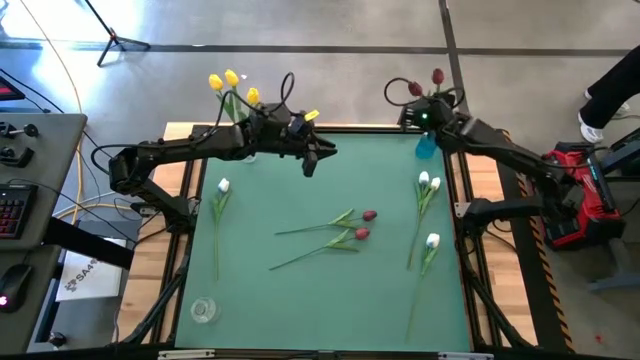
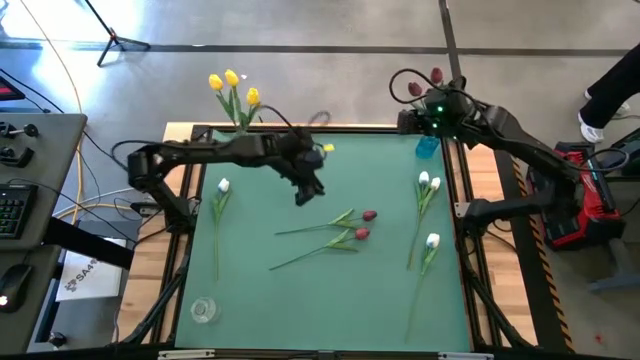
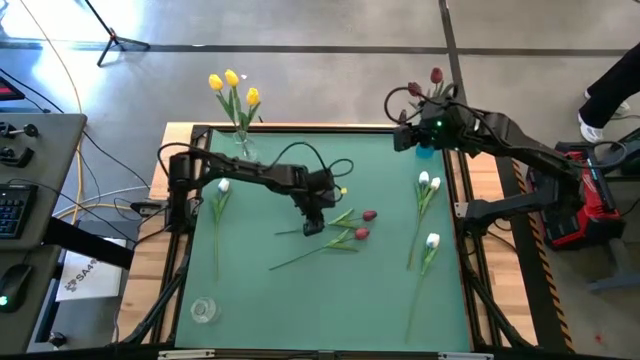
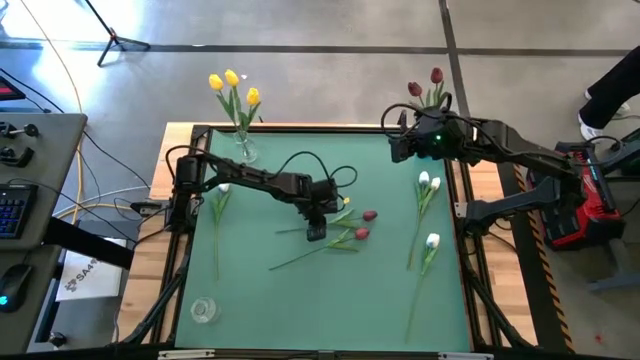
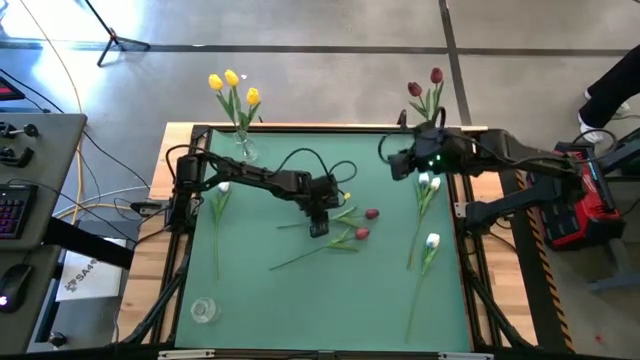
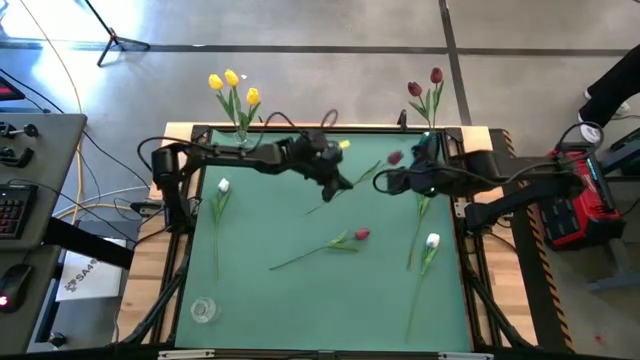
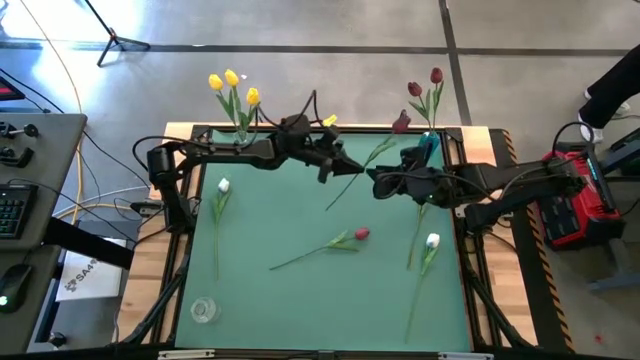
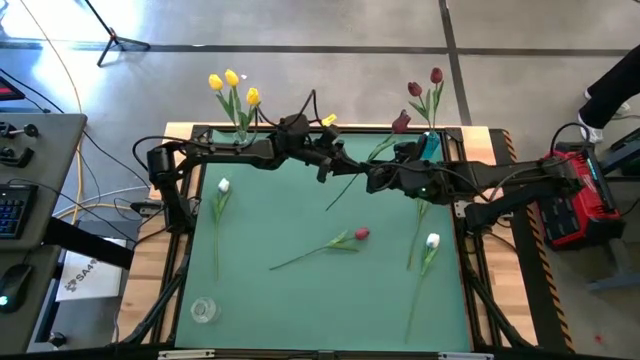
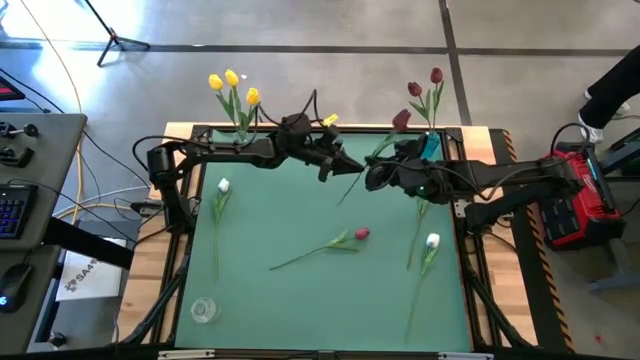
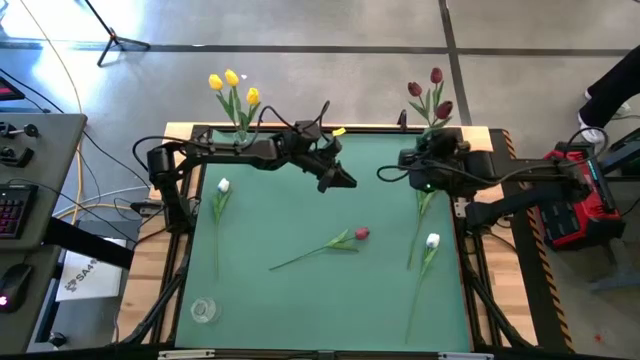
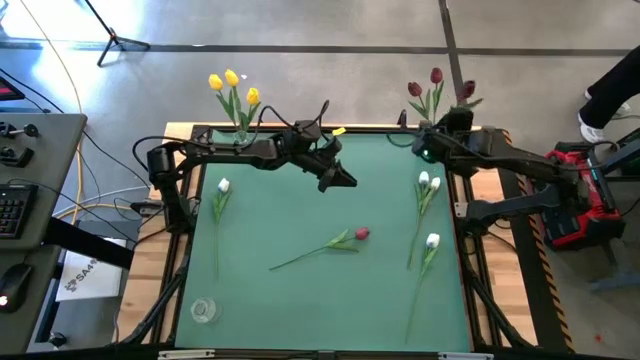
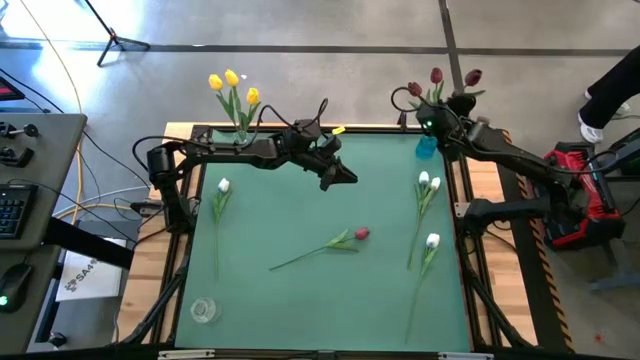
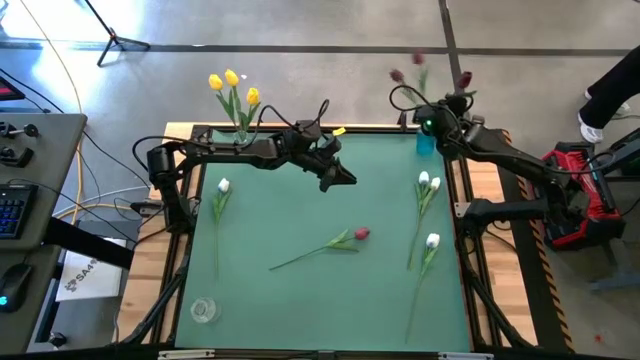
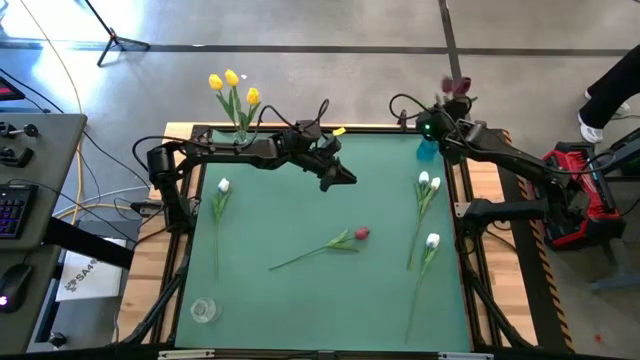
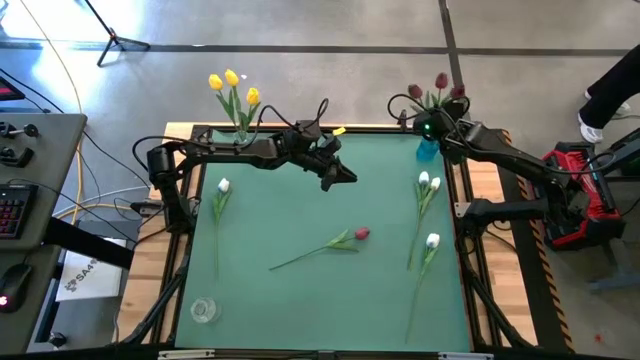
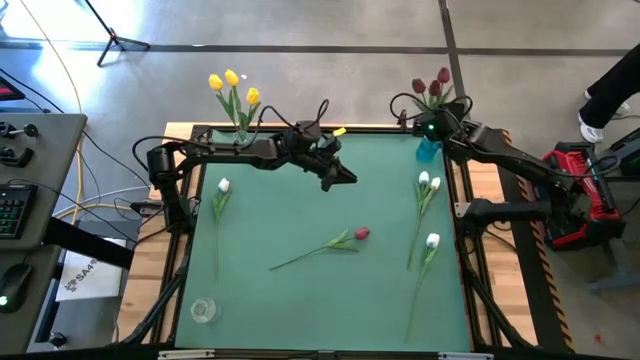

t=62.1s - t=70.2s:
Task: Sort flowers into vase by color
Put the top red tulip into the blue vase

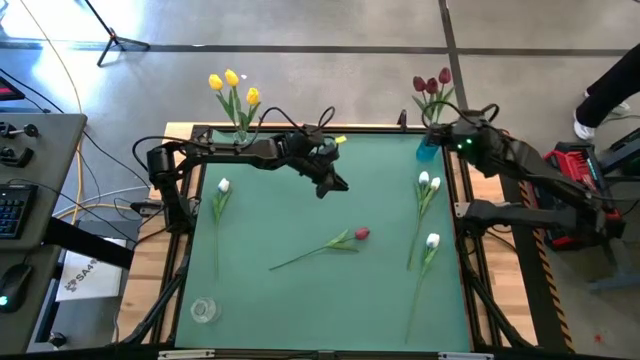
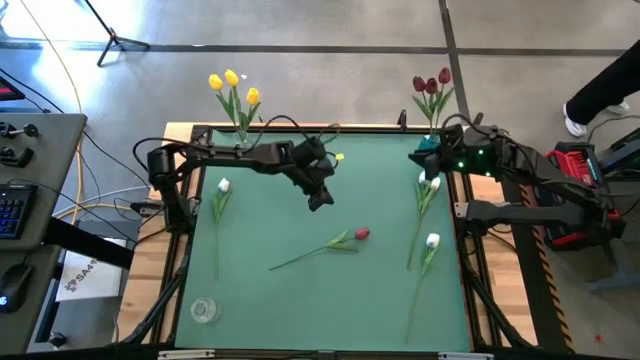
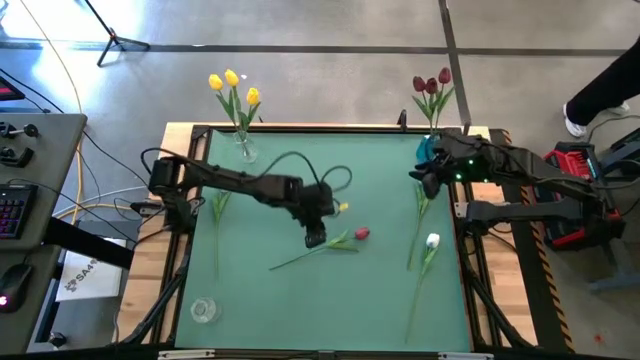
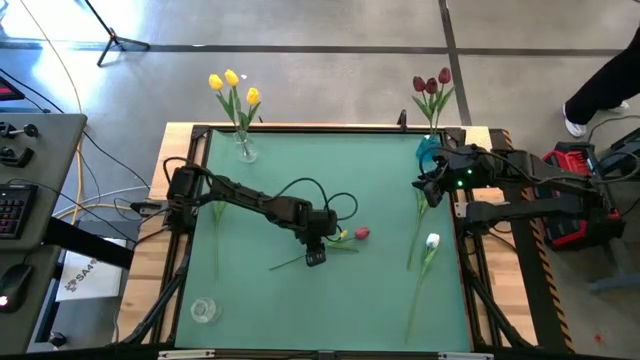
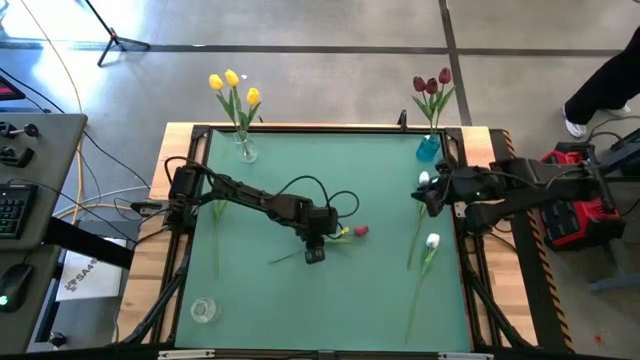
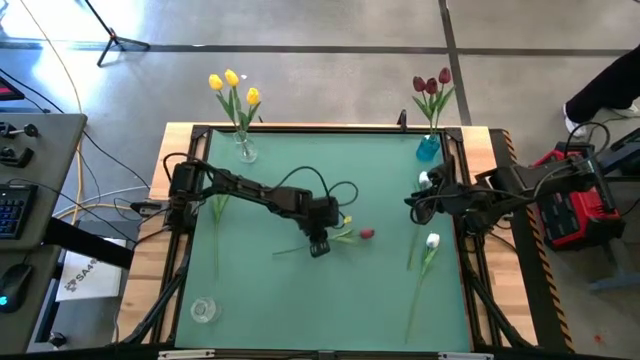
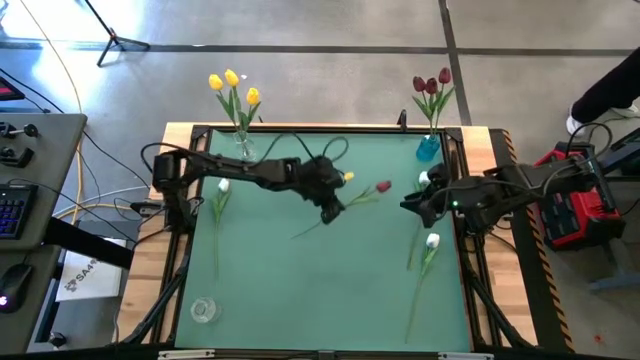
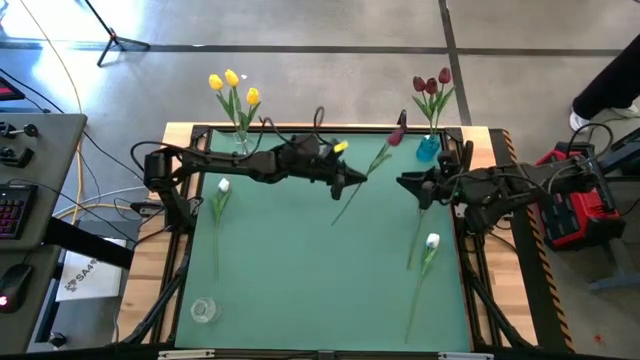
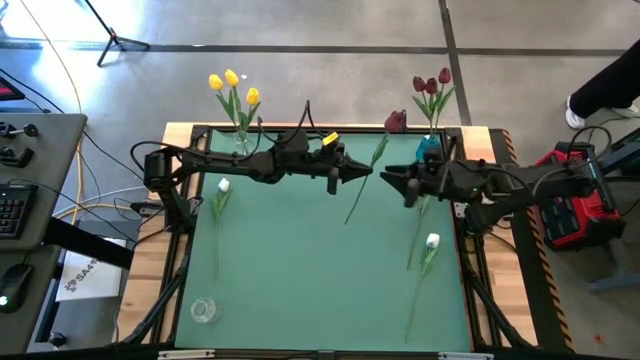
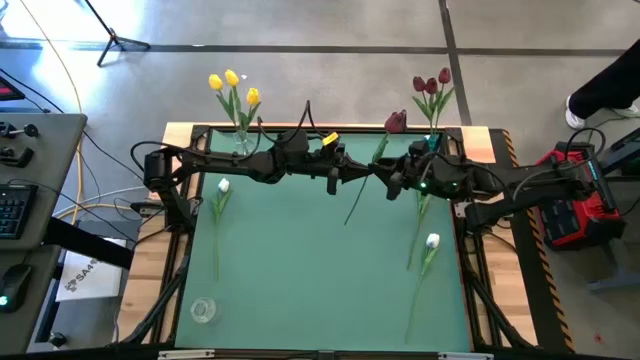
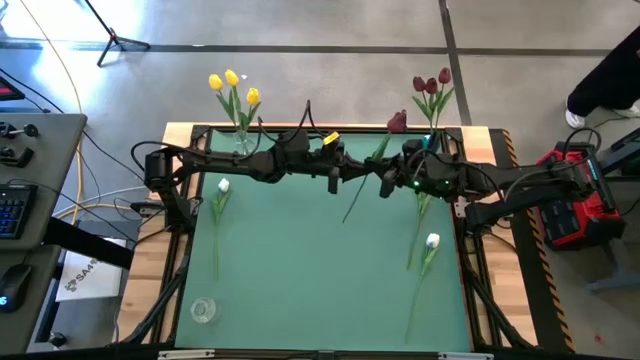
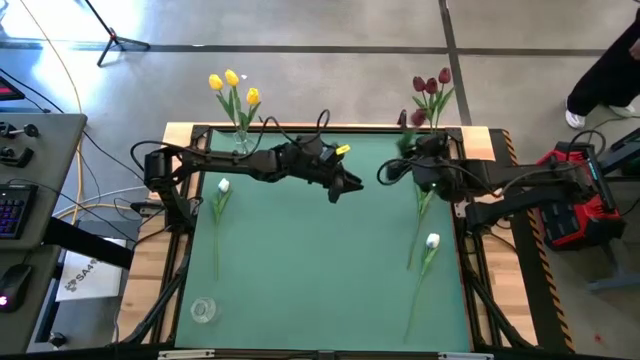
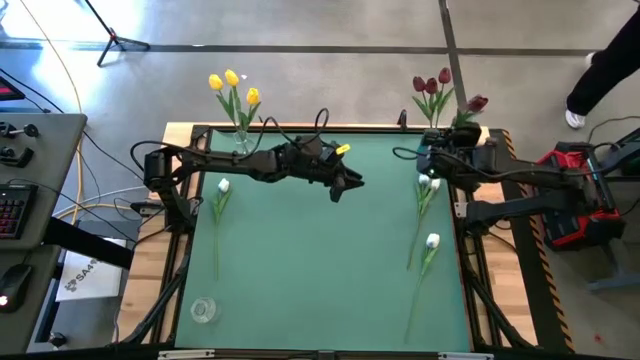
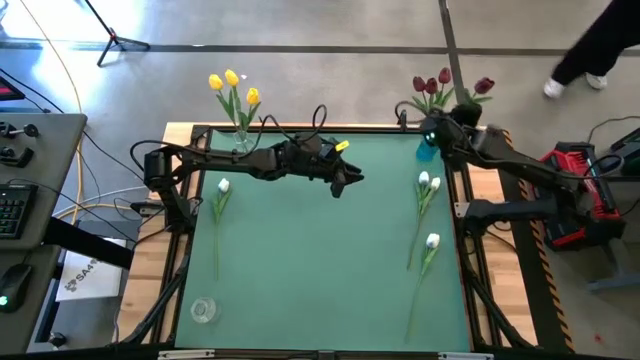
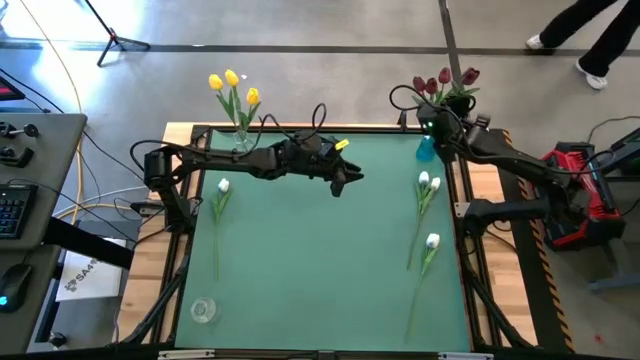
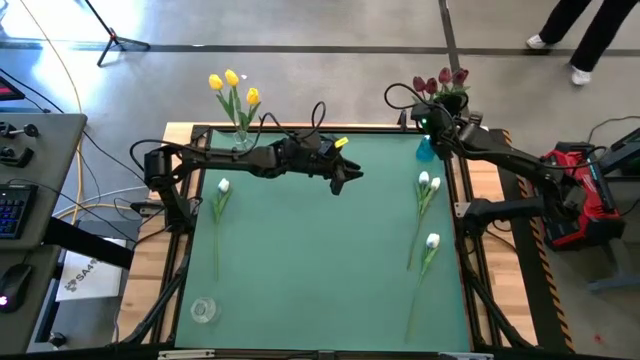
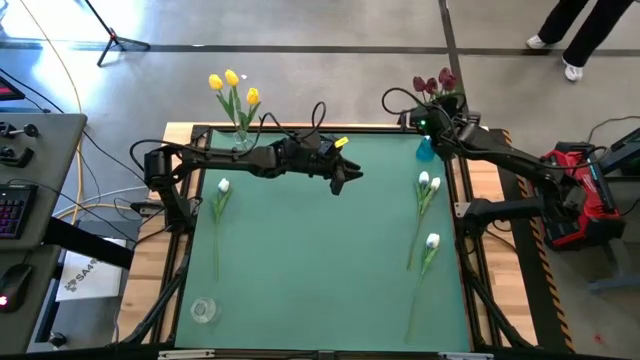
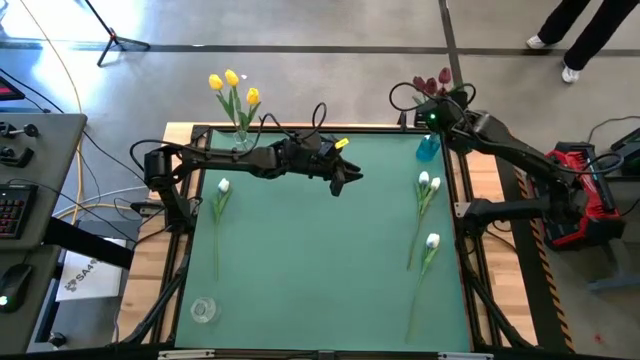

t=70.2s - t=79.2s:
Put the red tulip into the blue vase

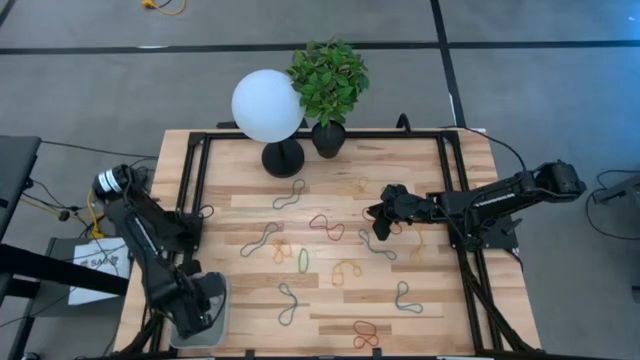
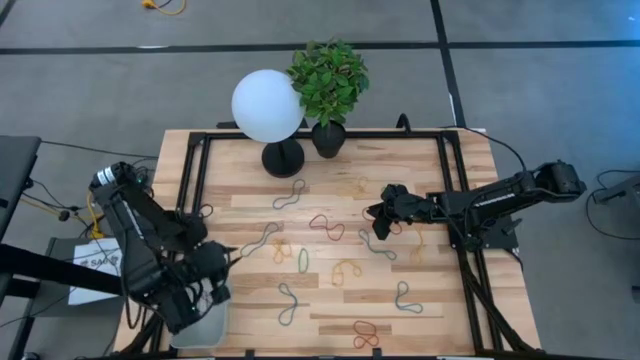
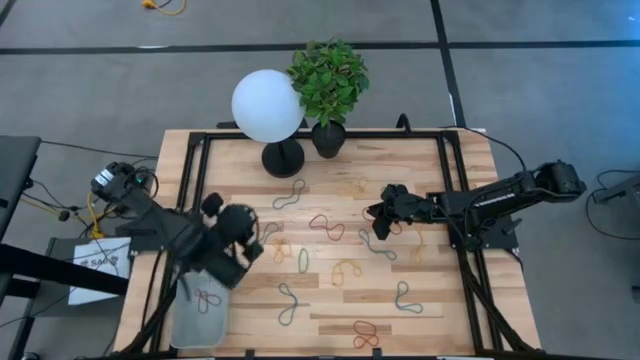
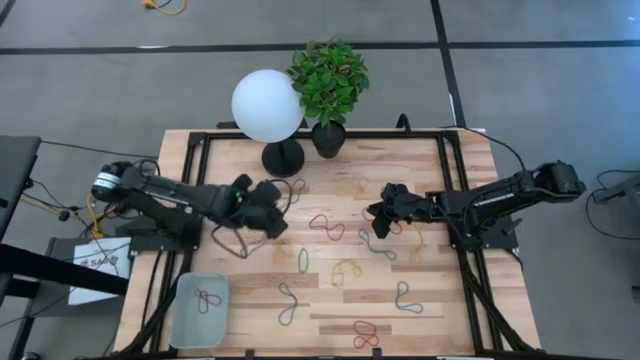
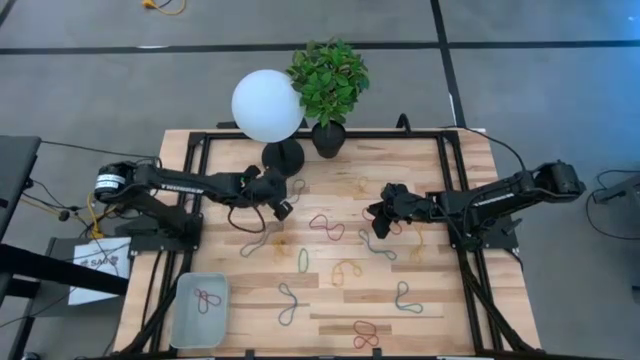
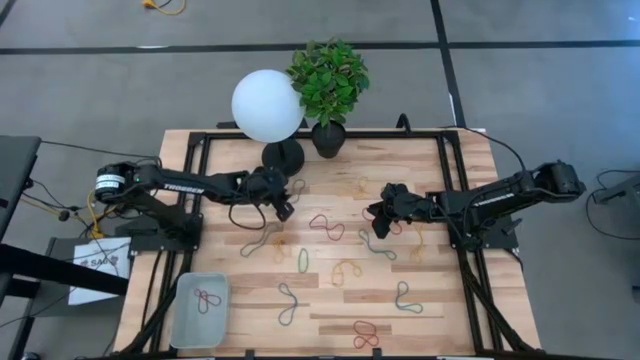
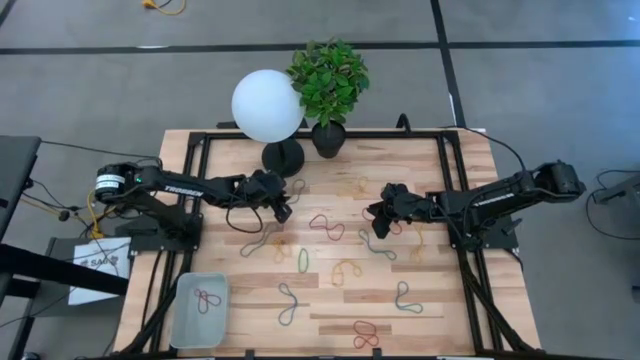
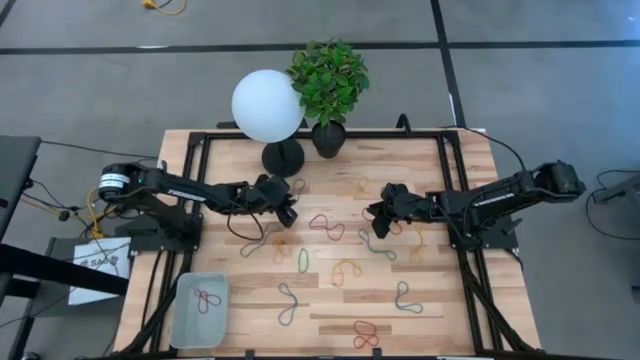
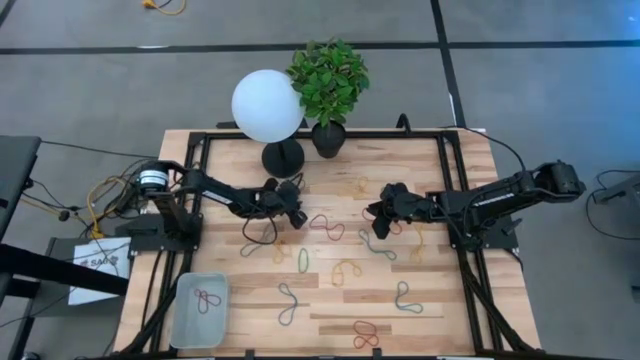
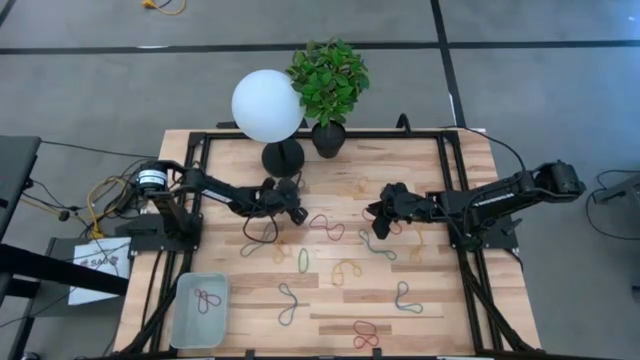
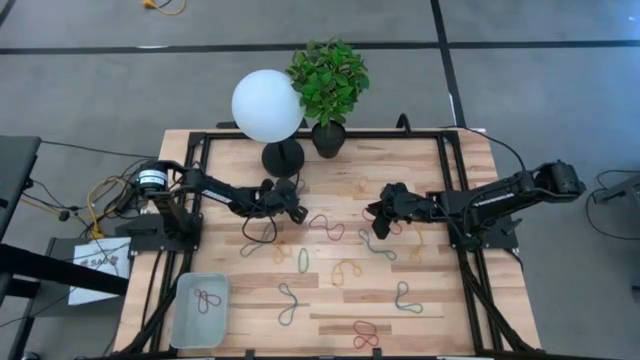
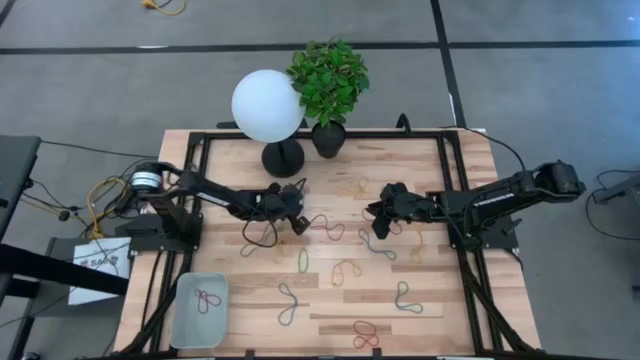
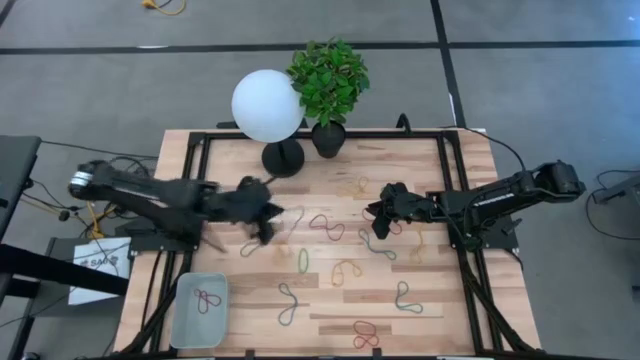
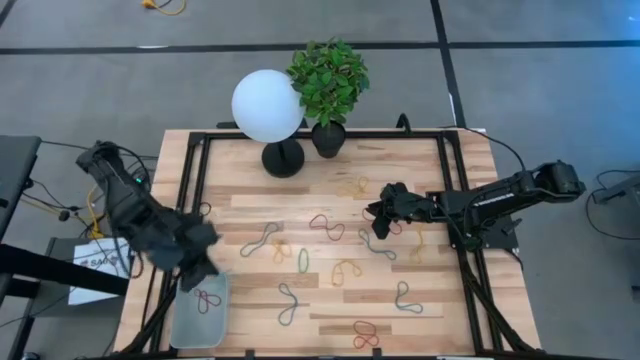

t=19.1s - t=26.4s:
Task: Pick and place items into bin
Put the blue rubber band into the gray bin
